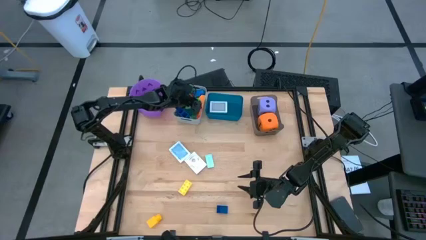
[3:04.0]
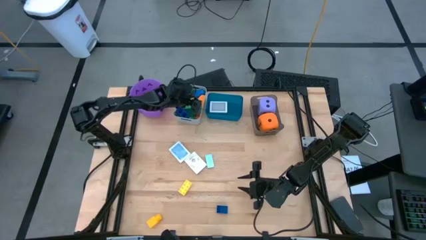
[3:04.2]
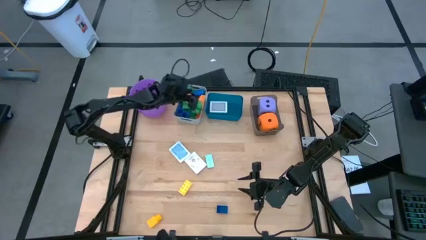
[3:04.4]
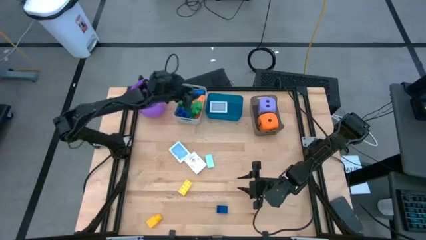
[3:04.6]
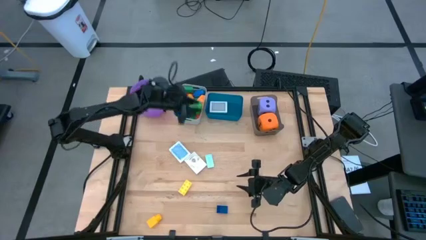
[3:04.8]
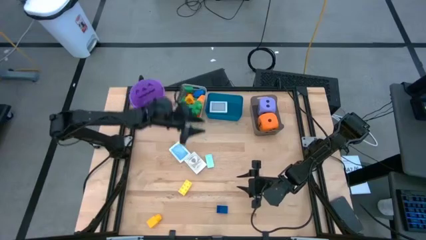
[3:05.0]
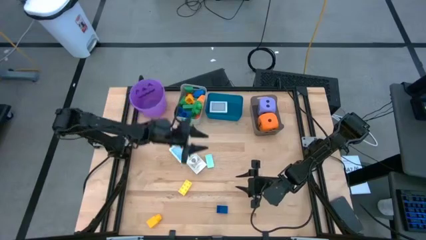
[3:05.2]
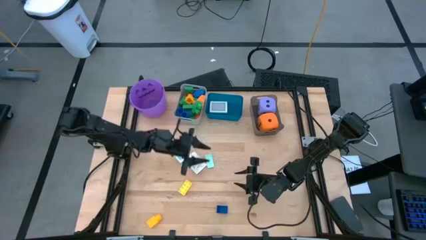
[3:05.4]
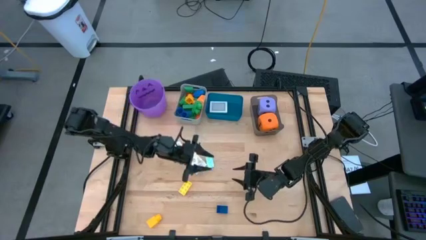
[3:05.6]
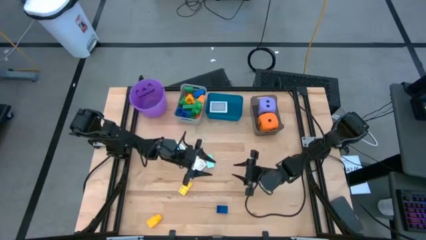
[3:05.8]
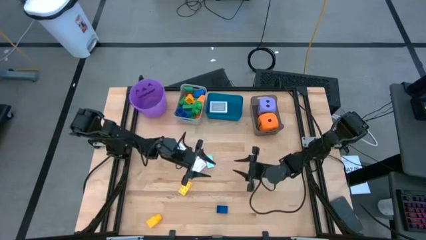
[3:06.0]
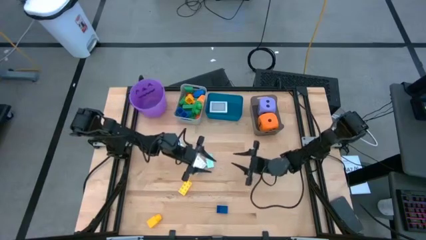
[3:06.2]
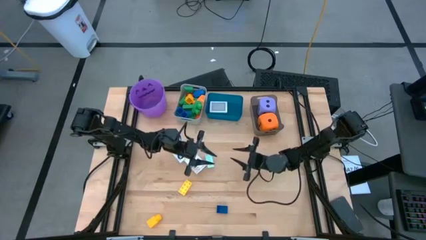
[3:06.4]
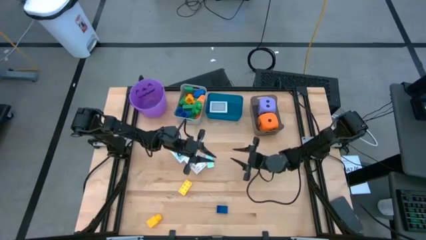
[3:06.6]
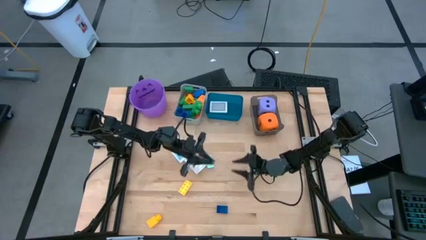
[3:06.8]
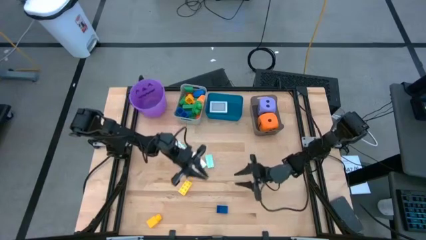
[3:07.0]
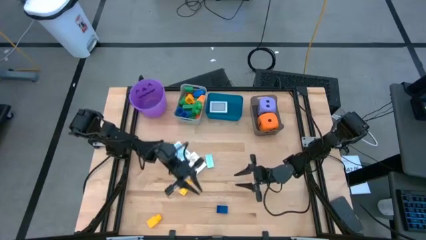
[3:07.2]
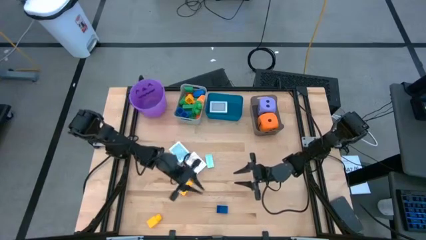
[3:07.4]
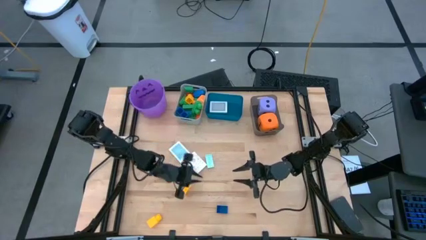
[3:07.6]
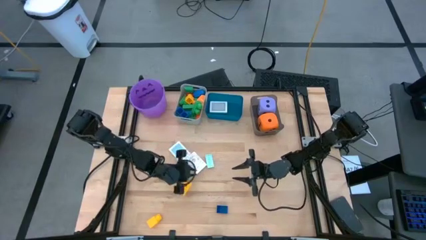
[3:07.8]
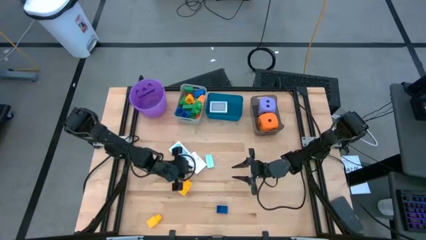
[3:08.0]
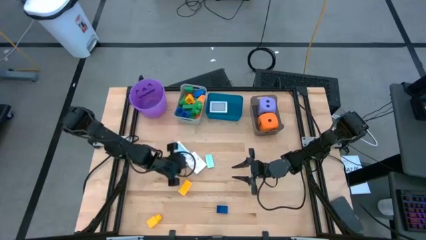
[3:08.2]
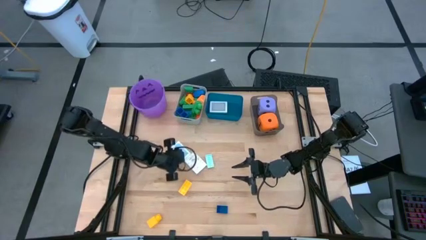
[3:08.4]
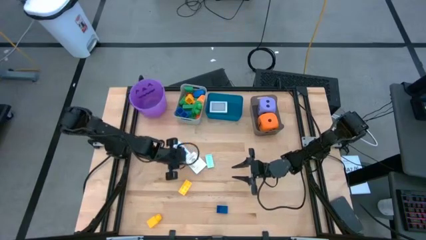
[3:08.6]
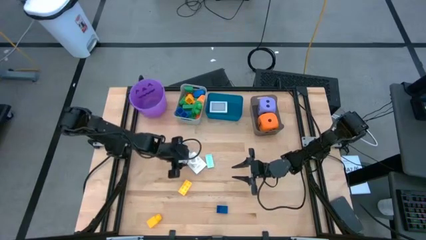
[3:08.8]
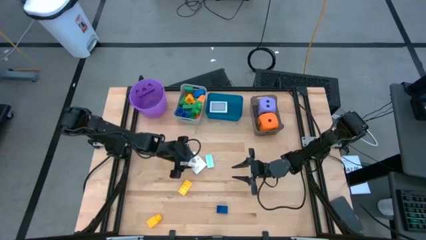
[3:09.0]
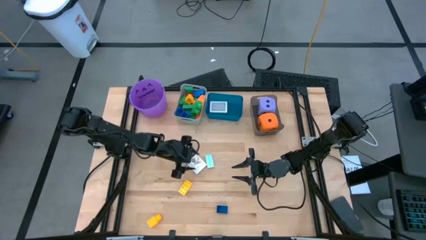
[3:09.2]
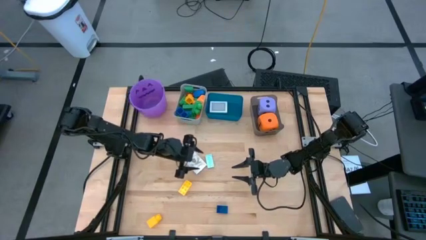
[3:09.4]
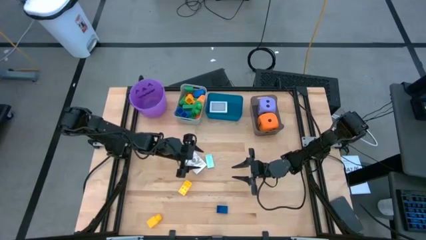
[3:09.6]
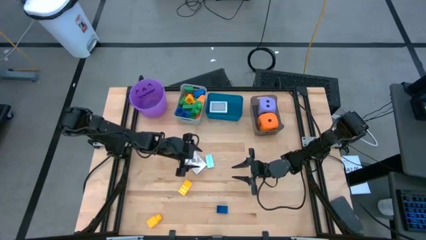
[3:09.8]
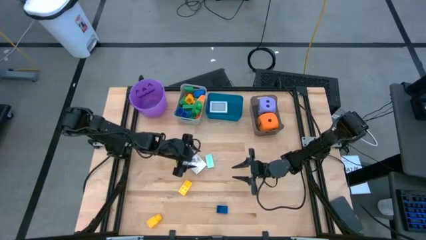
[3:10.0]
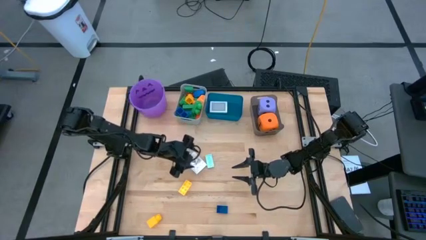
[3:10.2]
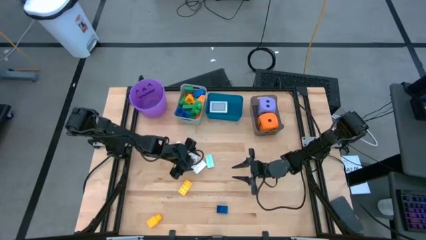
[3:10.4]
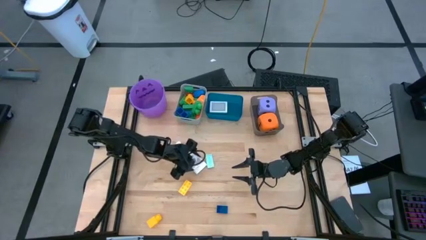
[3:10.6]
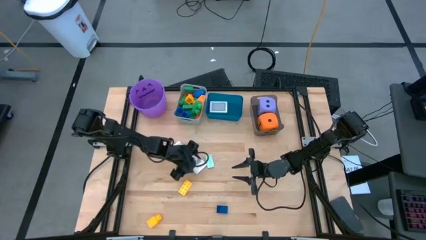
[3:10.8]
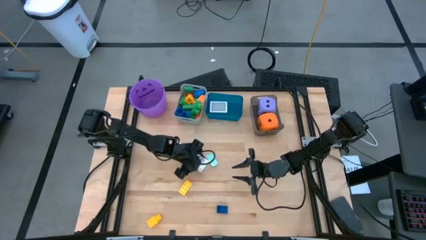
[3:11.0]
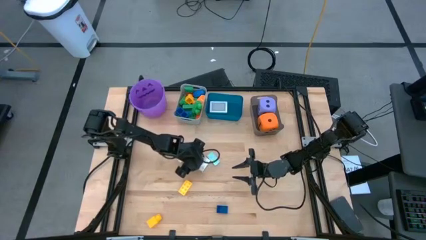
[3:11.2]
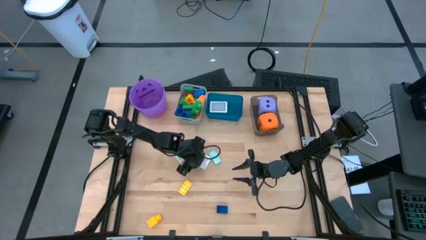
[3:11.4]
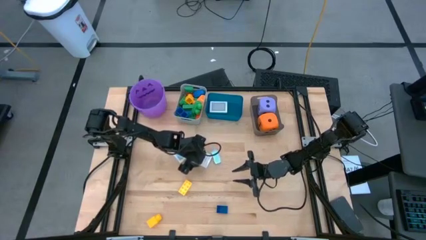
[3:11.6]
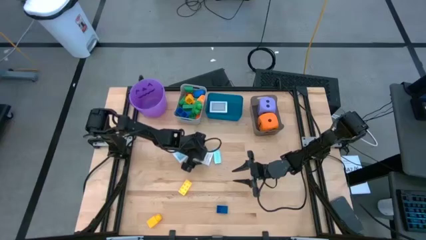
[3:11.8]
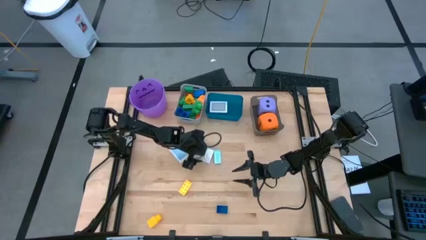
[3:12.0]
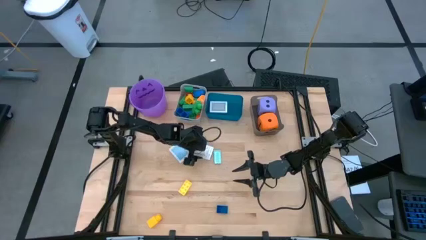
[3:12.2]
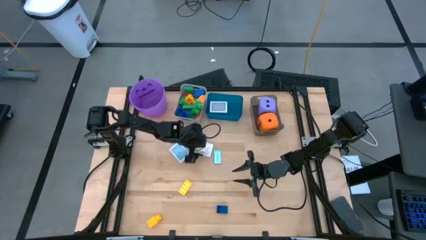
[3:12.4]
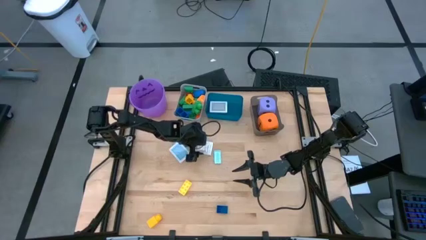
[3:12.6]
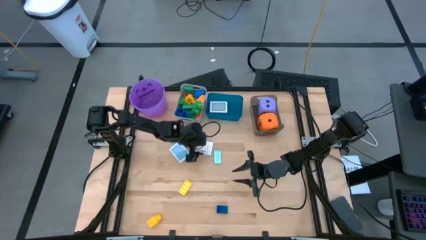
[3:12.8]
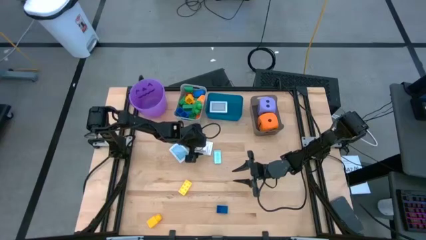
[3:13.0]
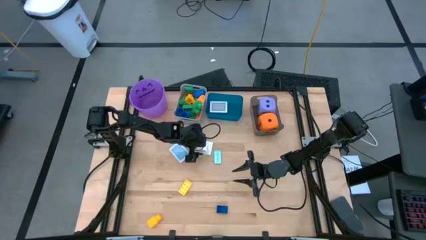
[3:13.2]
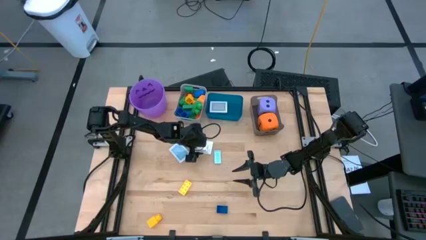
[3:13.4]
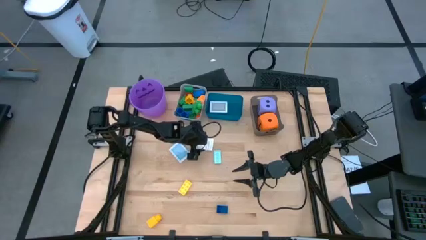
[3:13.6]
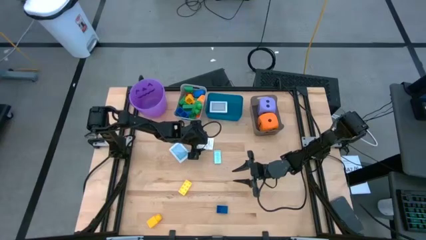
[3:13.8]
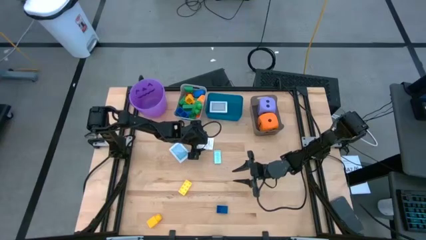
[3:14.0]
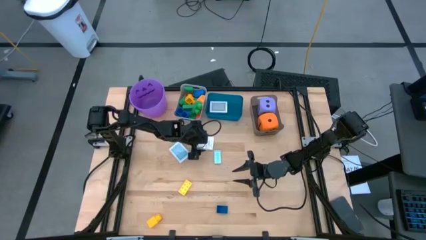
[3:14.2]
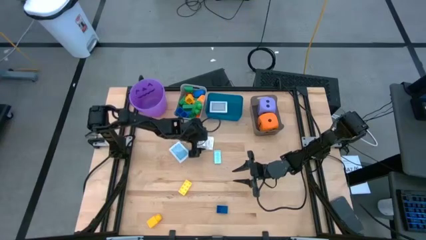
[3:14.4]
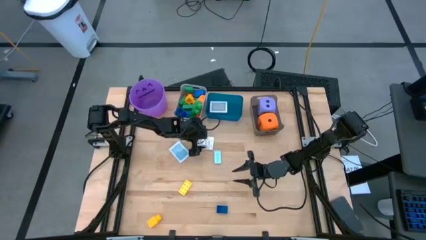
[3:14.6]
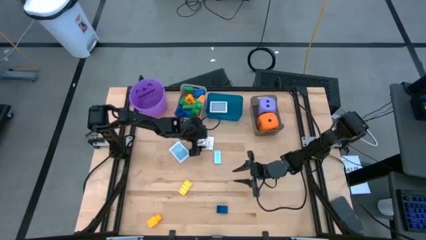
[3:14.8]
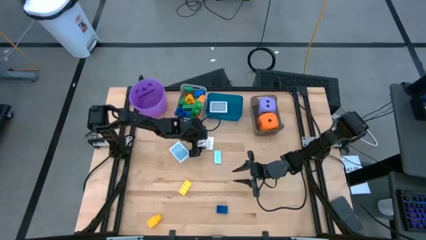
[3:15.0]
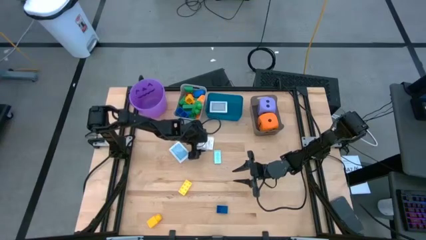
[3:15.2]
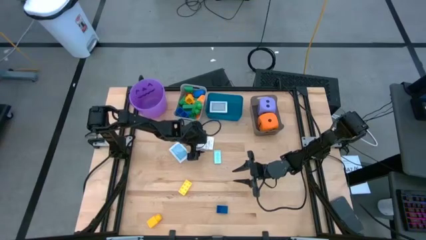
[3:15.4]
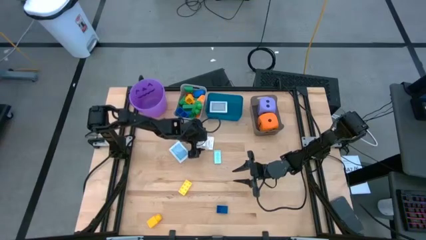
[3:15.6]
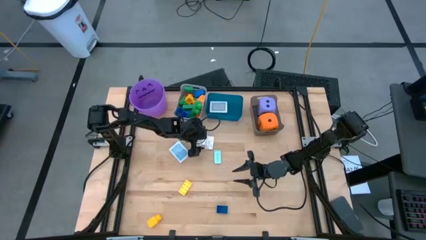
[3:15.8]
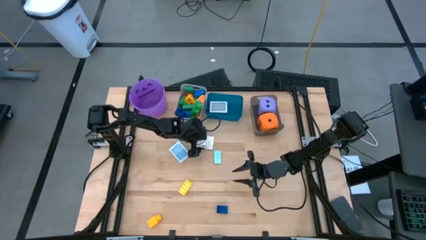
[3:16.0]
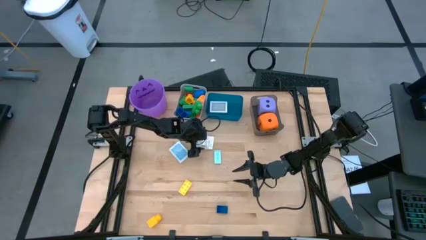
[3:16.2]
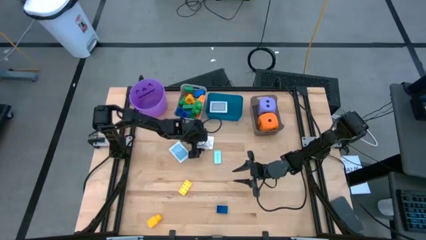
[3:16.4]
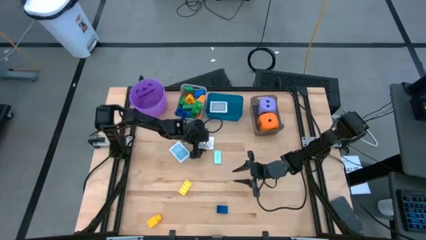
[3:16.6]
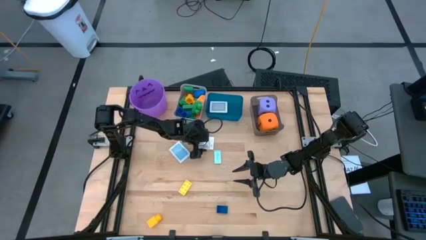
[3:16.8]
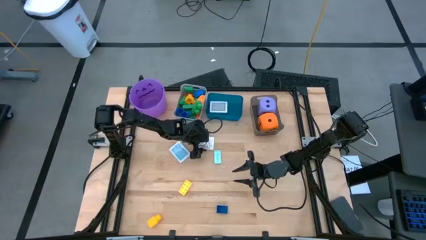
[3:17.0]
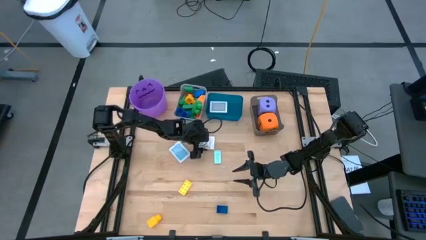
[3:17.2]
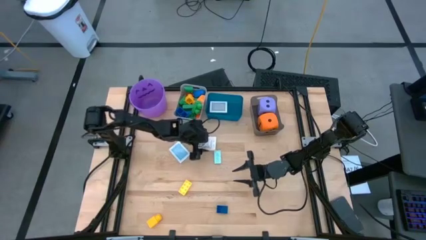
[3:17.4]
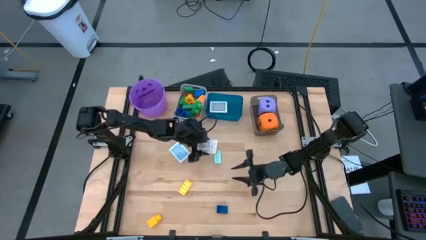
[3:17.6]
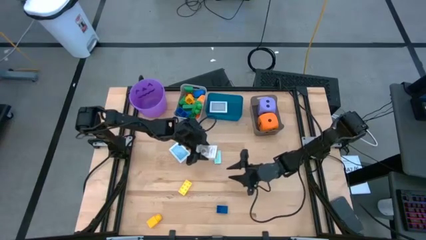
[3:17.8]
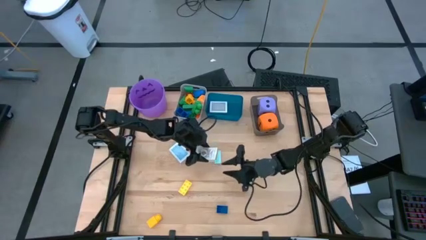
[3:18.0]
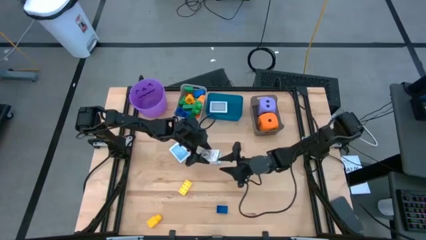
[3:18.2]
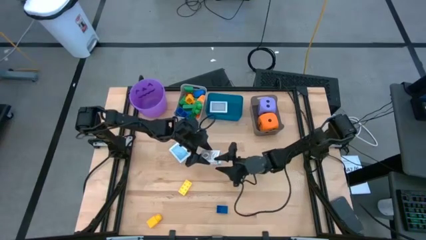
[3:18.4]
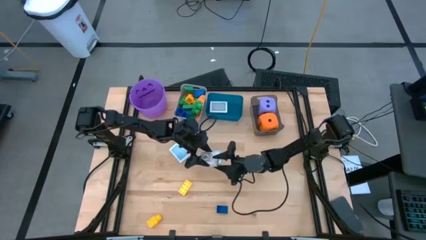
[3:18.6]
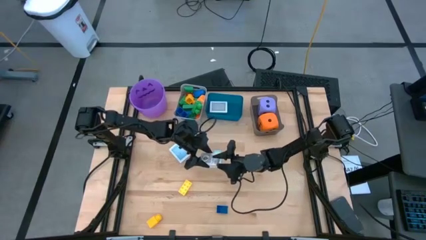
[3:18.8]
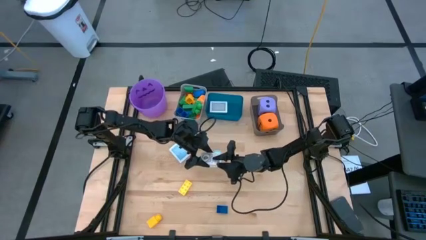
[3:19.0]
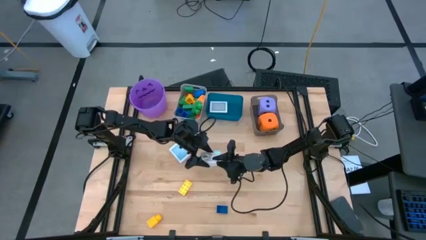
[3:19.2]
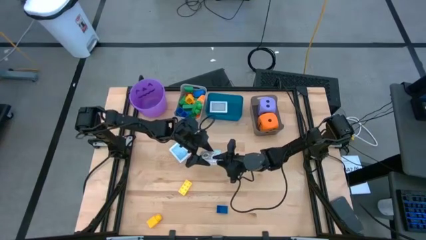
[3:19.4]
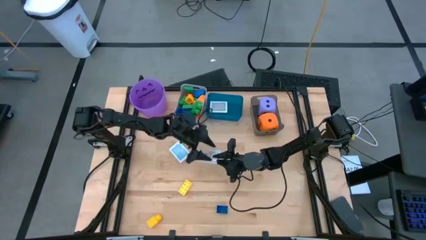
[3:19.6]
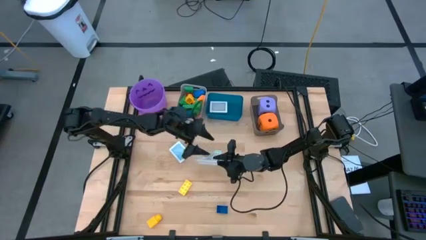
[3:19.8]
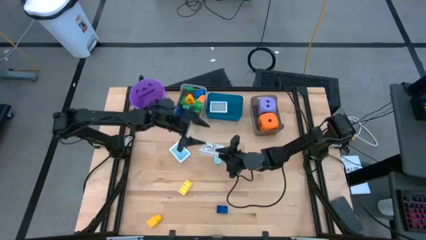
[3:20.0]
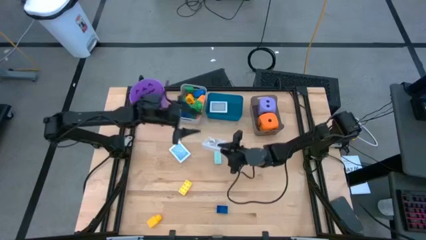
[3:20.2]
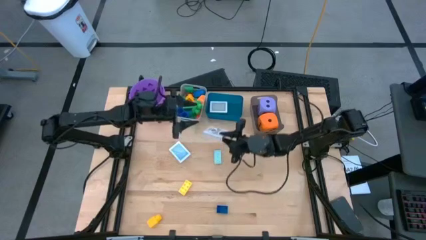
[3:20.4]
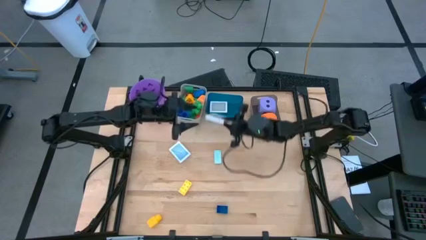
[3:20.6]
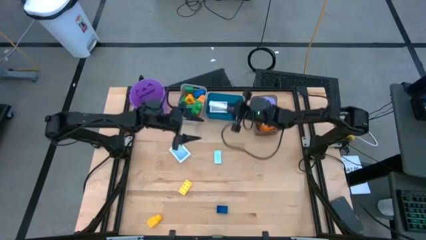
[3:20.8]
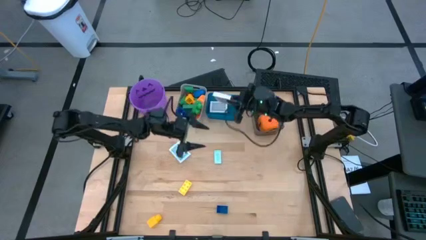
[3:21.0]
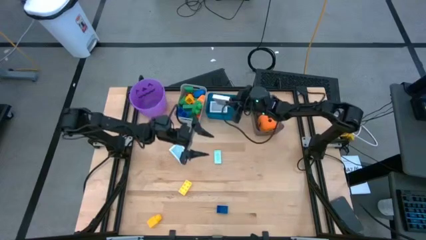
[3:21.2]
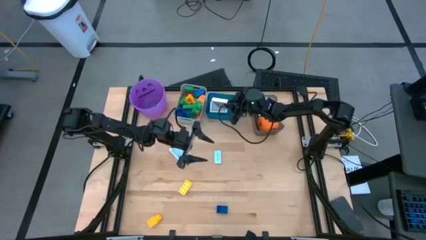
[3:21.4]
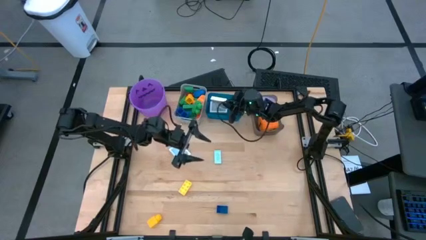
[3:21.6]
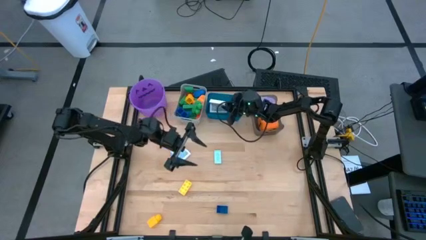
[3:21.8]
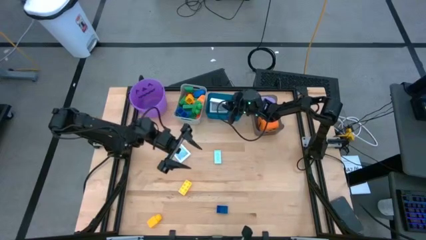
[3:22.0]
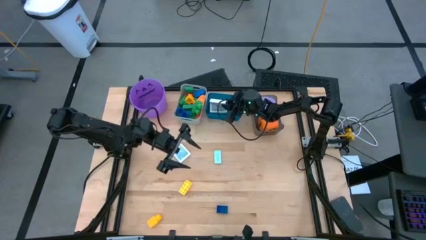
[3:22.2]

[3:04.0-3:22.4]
Task: Pick & Place Toys
Put the brown deck of cards into the blue bin
